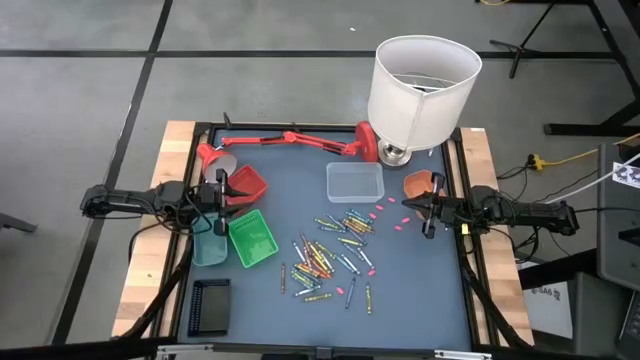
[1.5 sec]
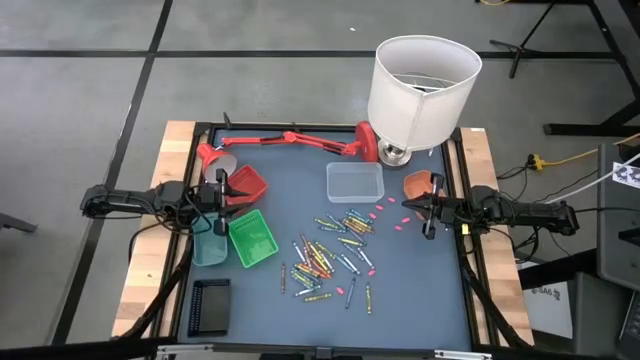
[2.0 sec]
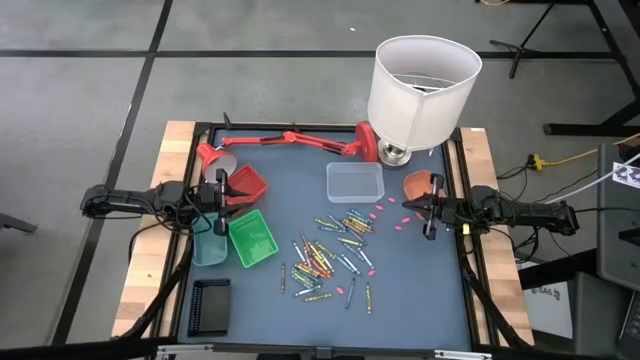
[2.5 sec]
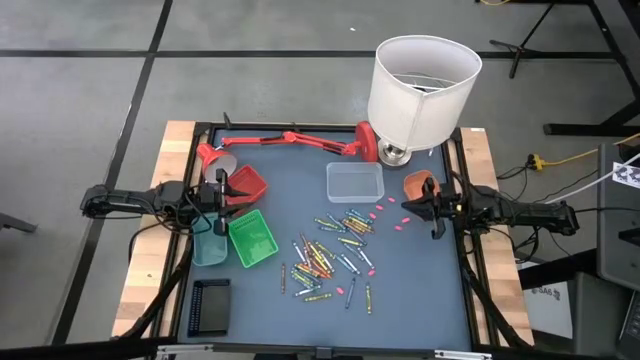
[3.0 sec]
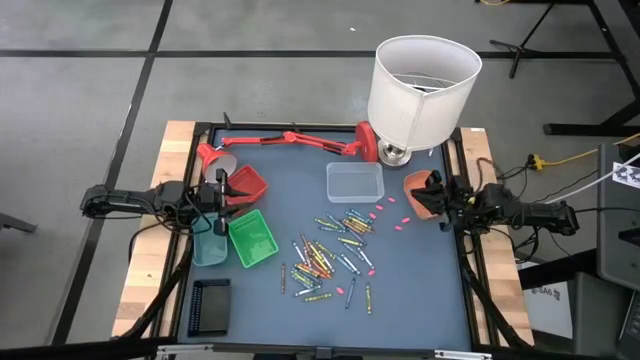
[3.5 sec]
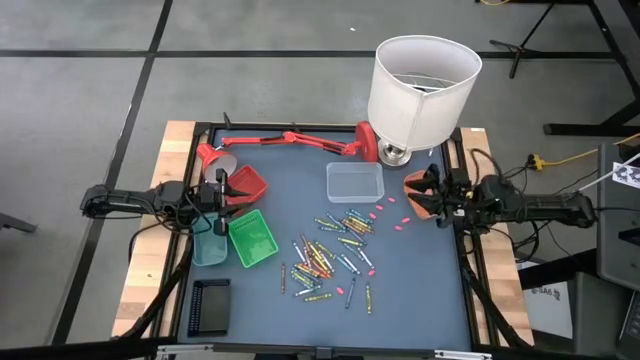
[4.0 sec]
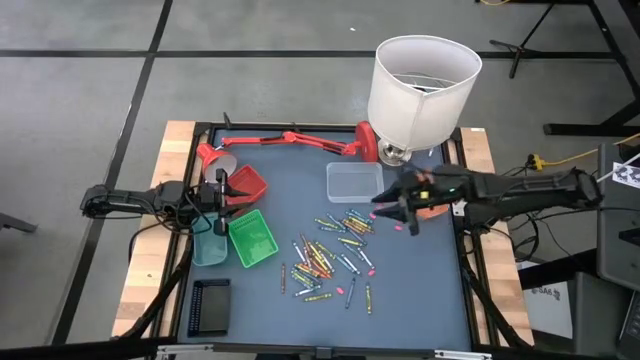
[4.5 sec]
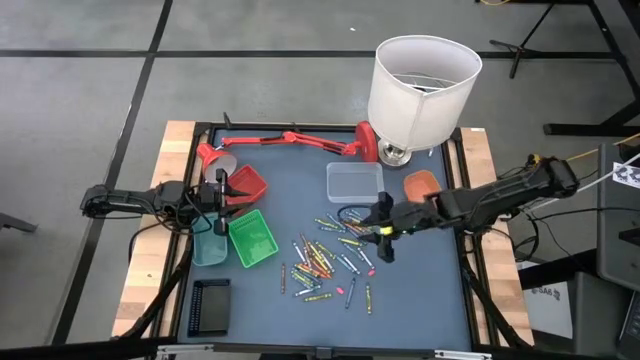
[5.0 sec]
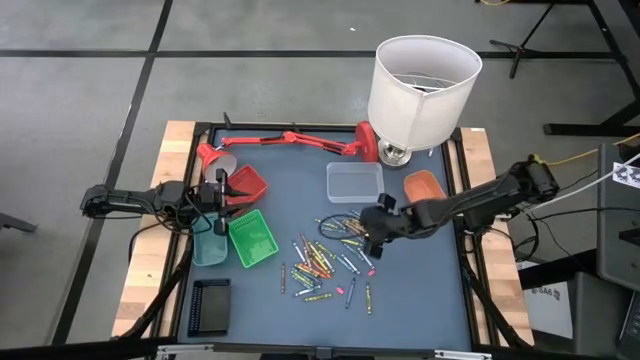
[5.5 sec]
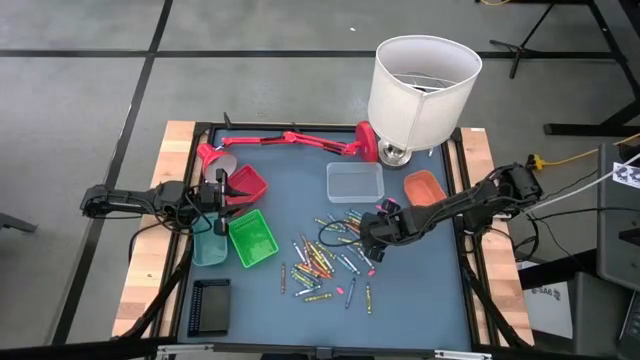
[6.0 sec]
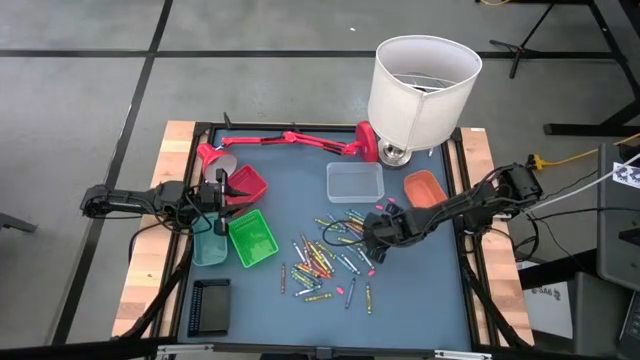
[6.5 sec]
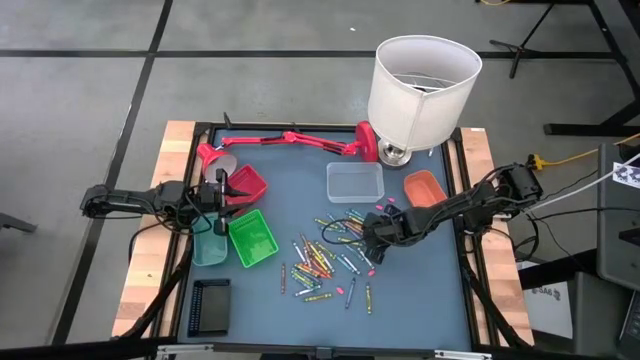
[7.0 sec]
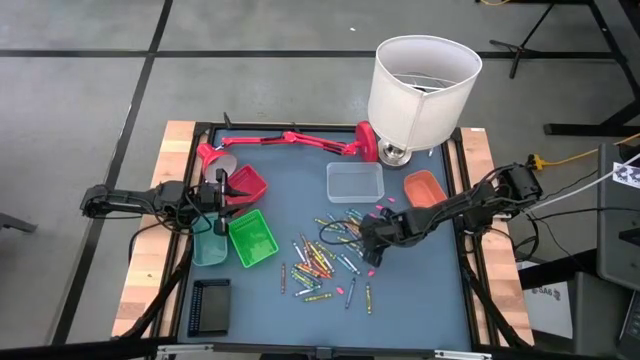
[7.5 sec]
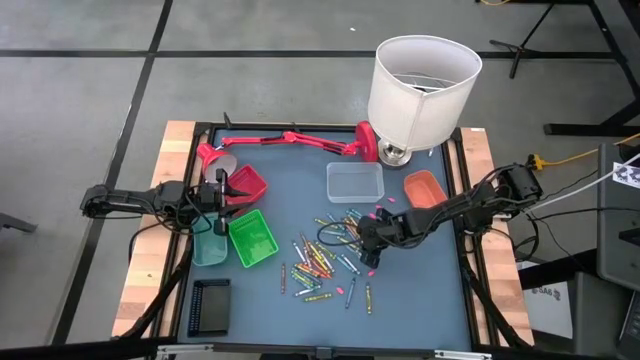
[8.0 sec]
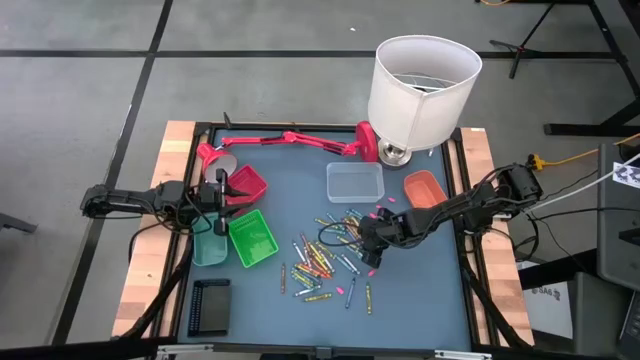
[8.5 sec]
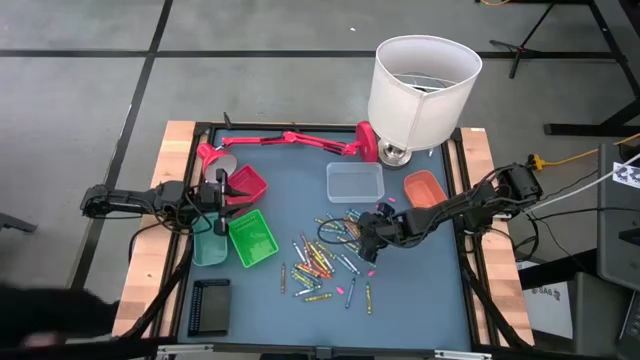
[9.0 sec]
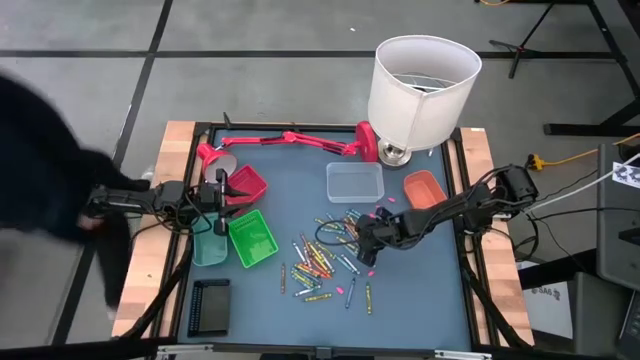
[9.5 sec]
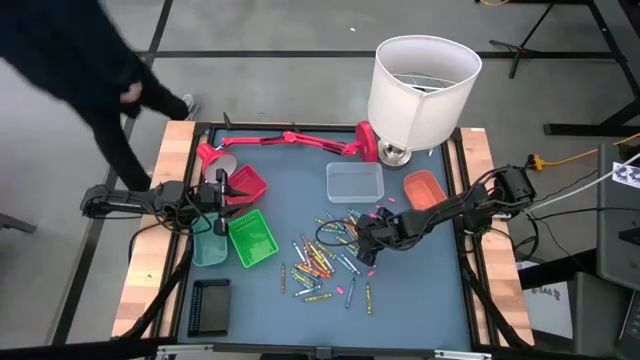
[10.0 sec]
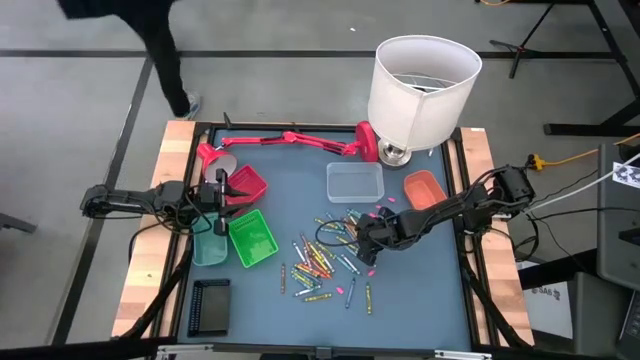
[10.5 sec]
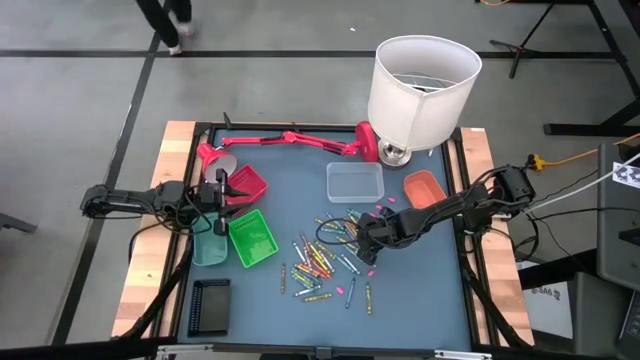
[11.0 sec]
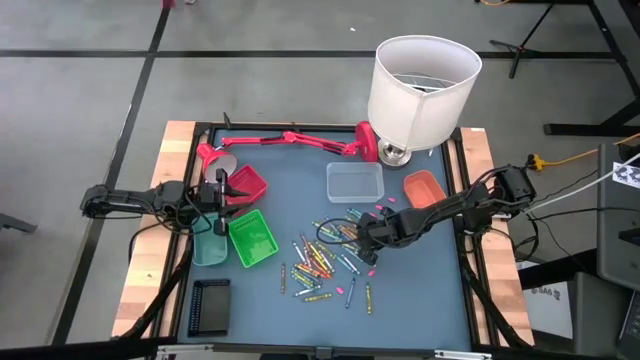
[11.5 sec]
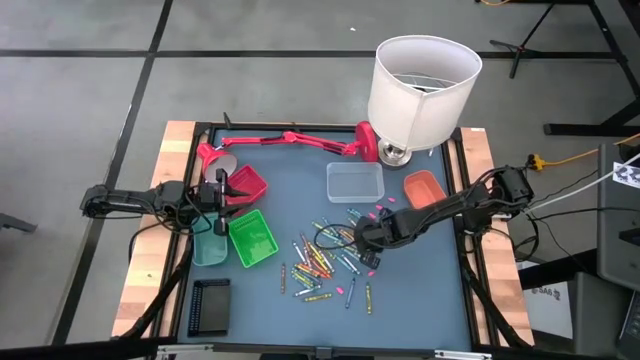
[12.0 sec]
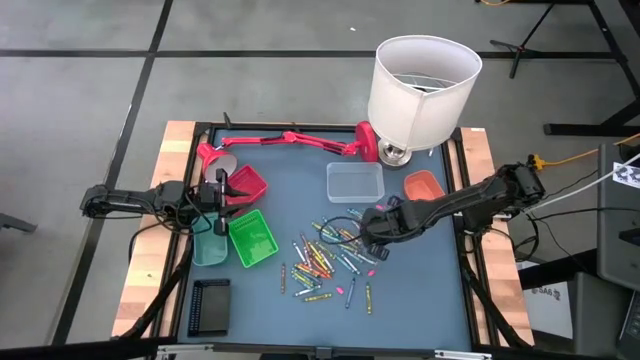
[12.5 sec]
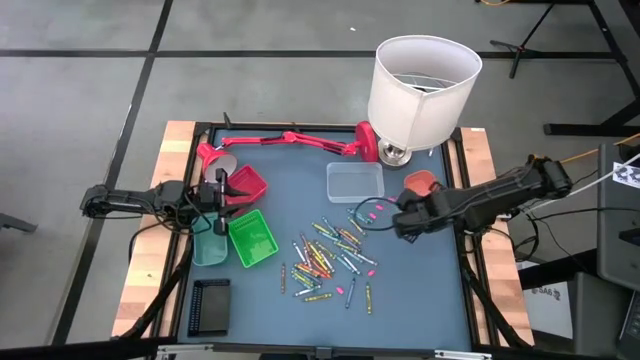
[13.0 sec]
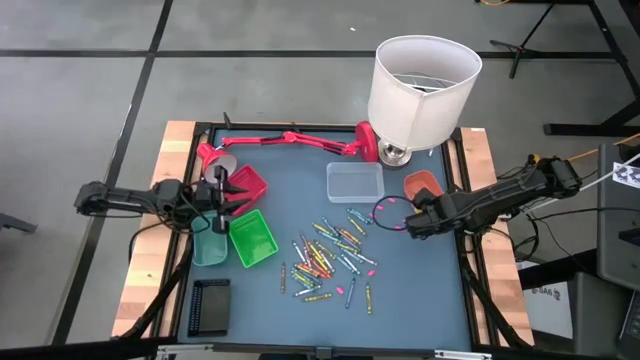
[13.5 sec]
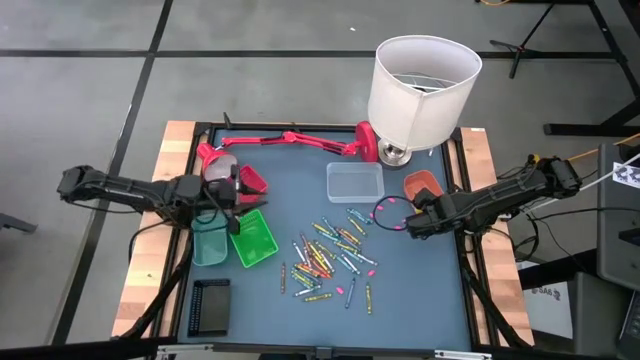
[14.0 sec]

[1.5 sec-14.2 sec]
Task: Sort crayons
Put the brown crayon into the orange bin

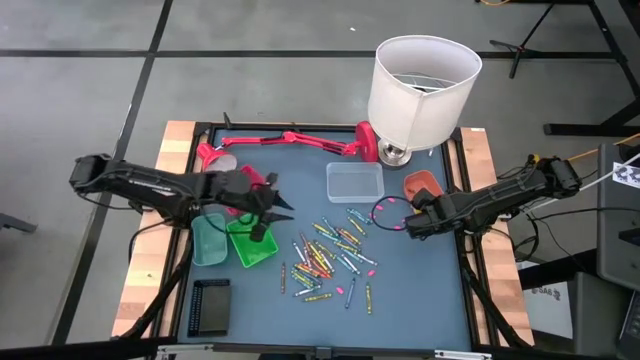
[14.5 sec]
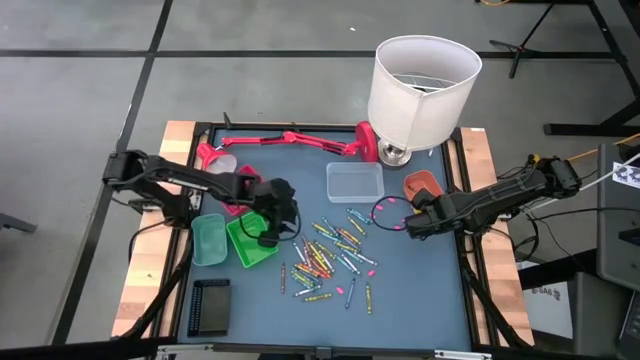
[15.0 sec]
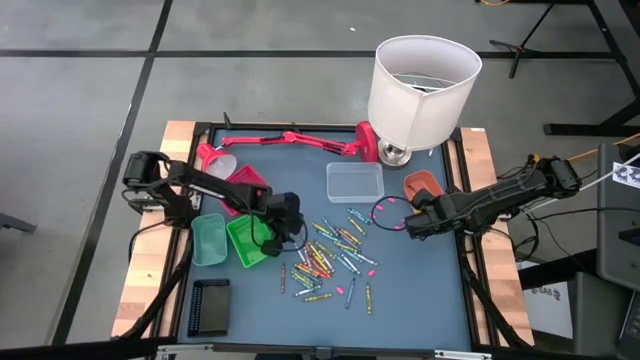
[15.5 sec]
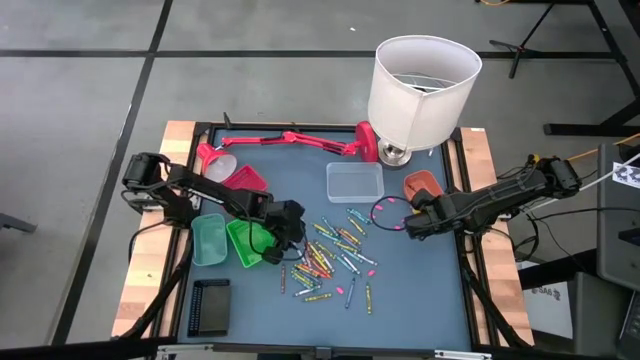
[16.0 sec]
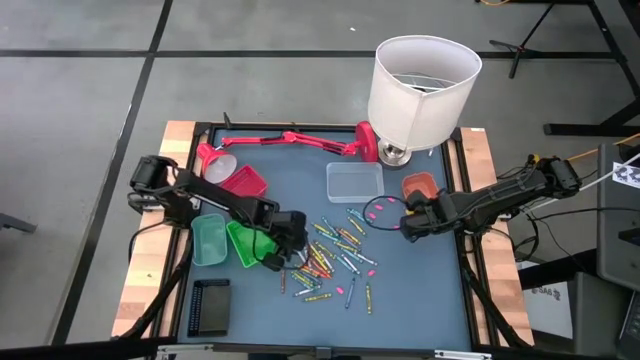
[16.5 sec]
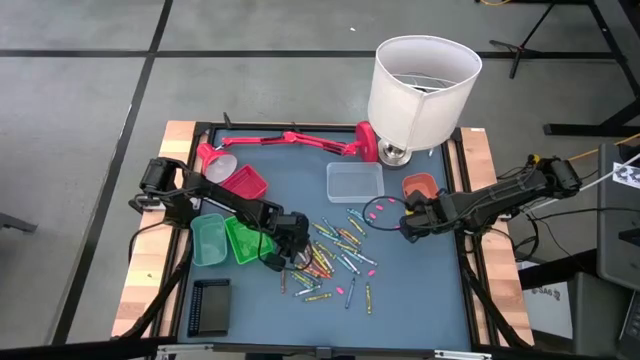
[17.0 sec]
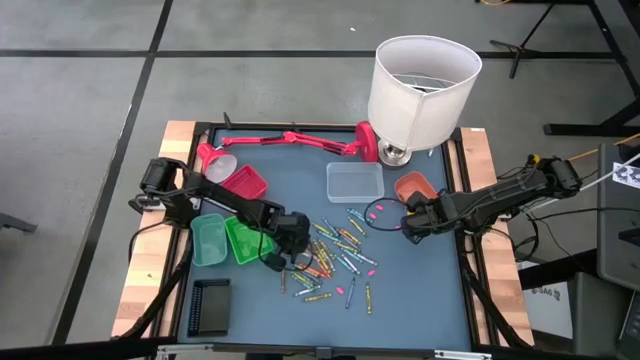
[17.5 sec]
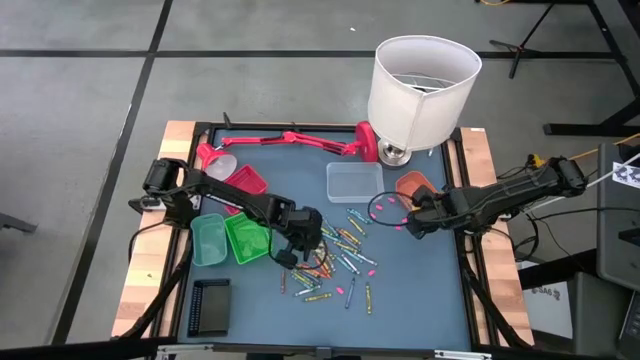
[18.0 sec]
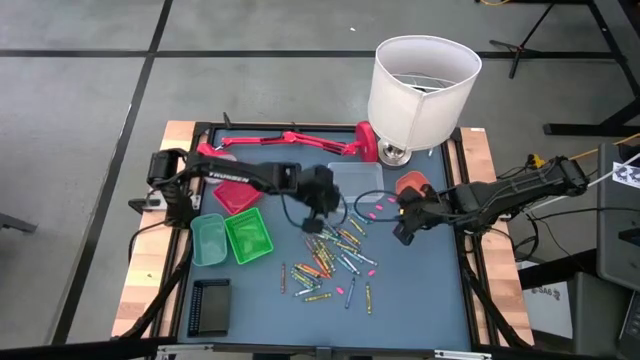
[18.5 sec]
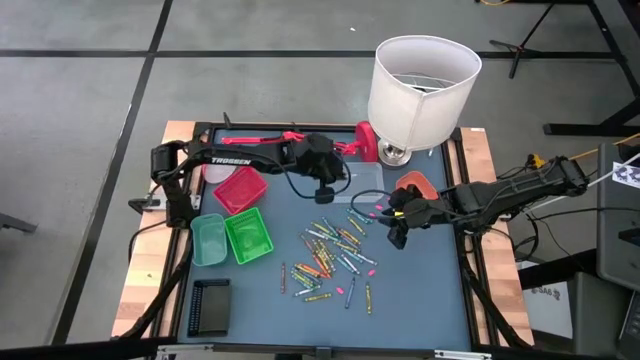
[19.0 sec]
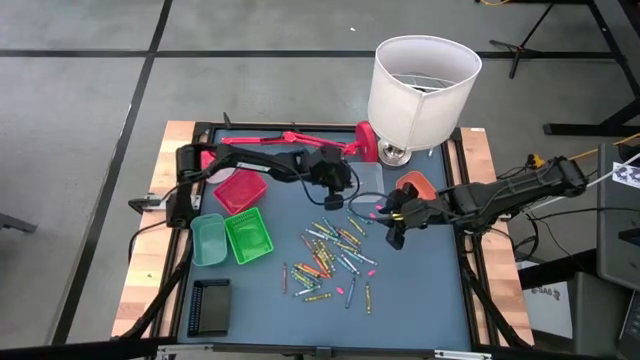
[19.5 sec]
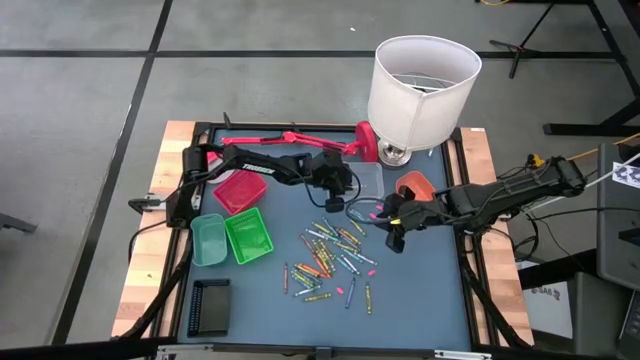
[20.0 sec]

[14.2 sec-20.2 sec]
Put the gray crayon into the transparent bin
